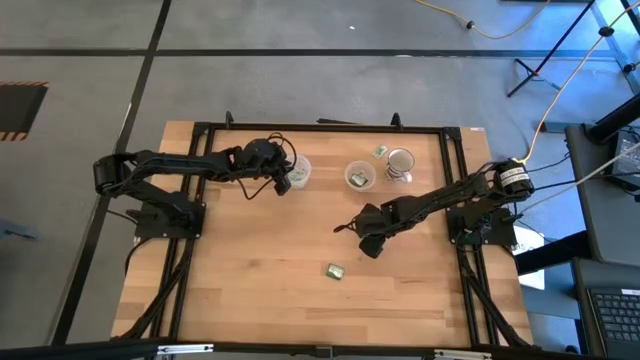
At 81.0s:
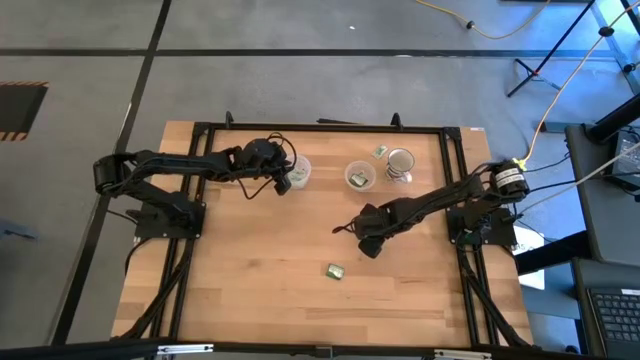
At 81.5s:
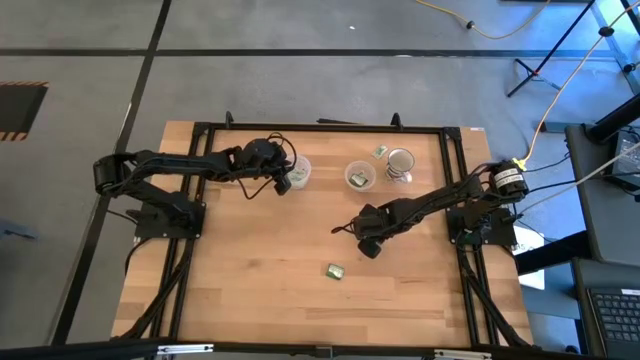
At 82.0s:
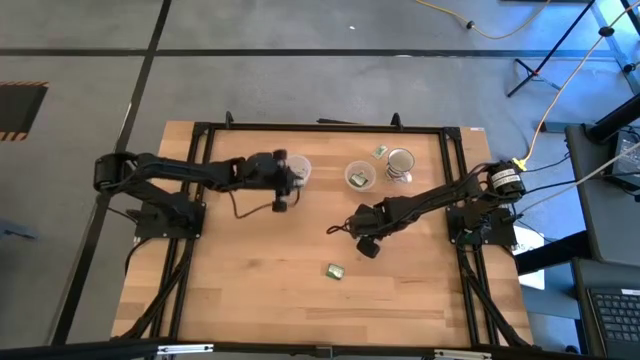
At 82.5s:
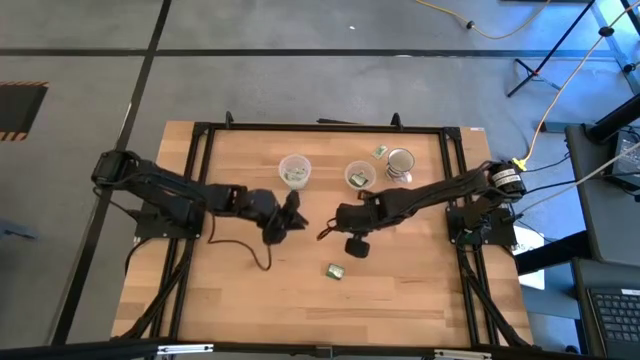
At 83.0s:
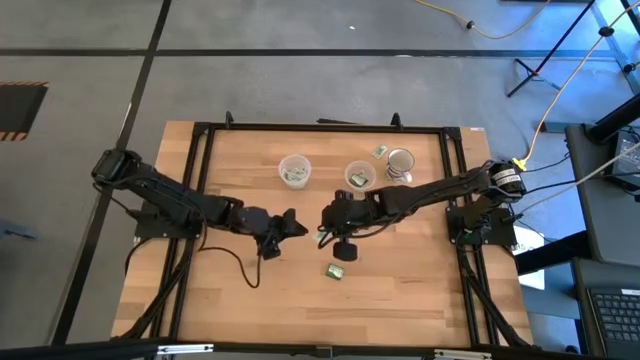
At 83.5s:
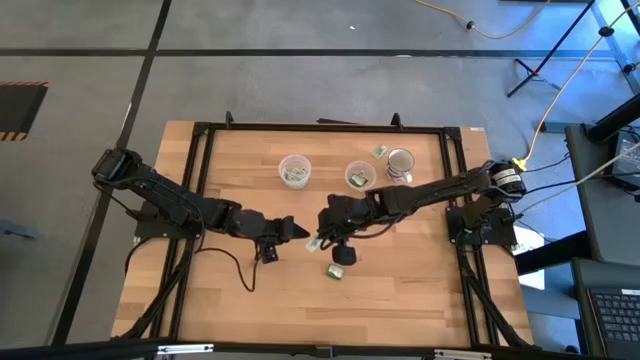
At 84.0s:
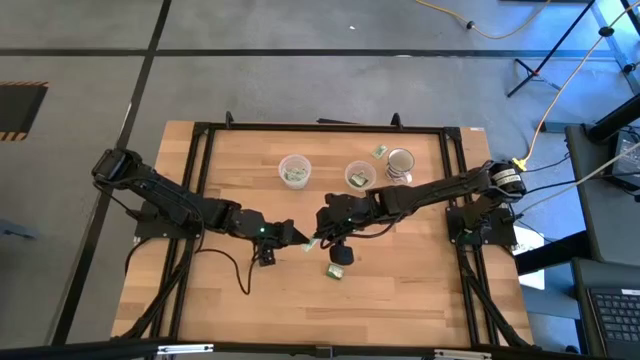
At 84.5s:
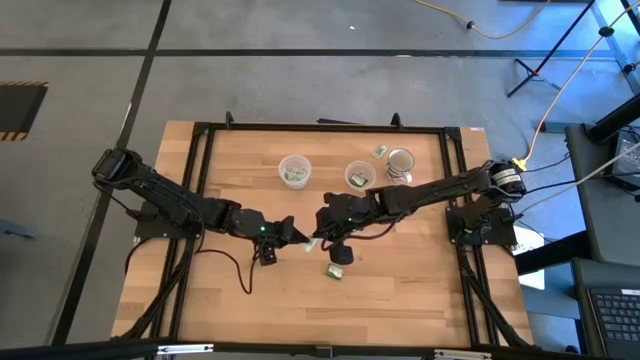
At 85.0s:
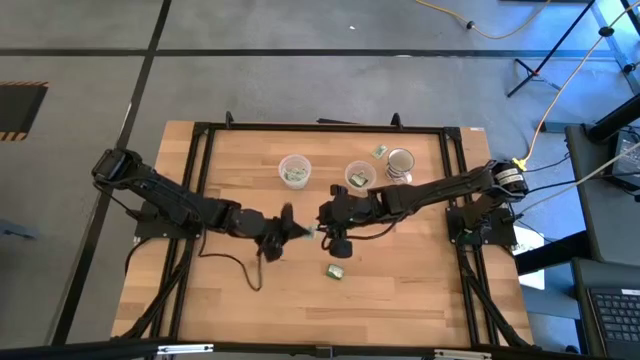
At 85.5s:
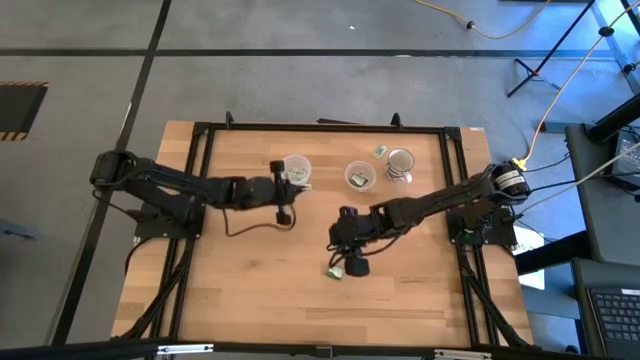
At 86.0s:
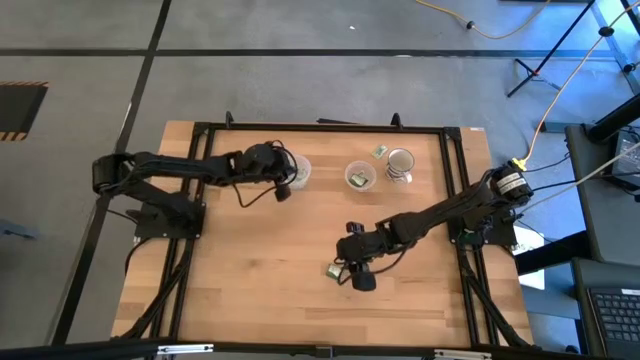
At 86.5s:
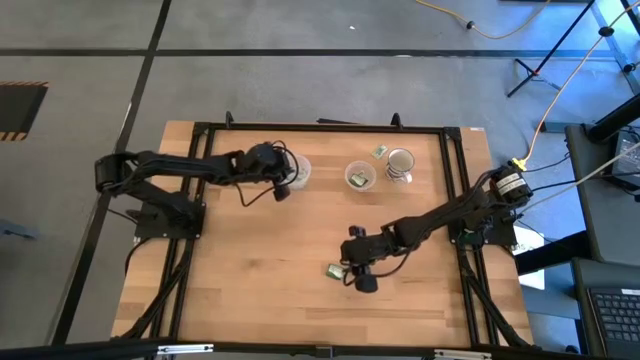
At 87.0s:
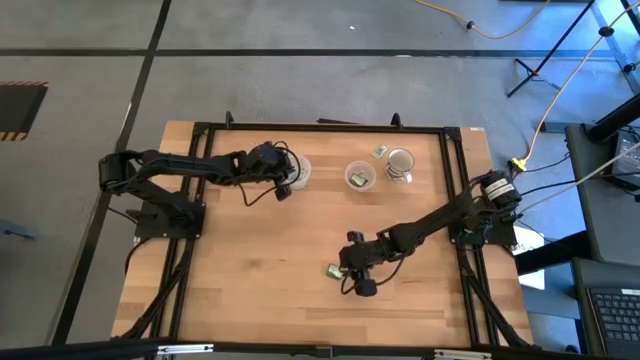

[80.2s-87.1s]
Task: Pick and place Stevia / Truvia into bins
Put the white stevia packet into the large transparent container

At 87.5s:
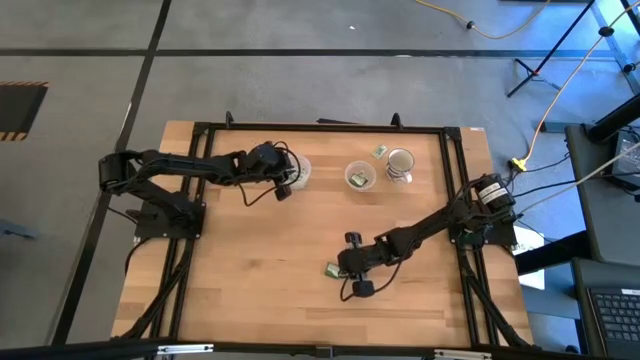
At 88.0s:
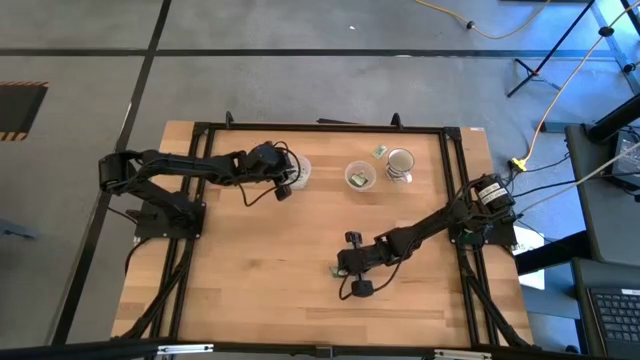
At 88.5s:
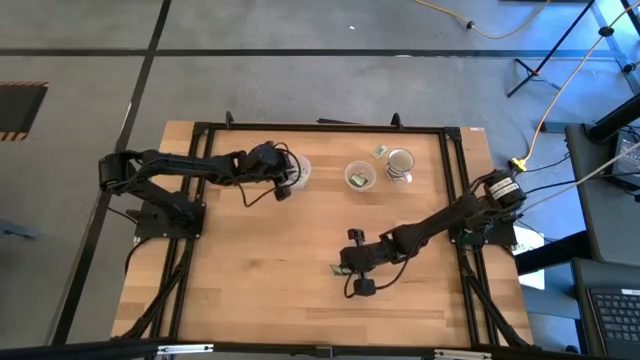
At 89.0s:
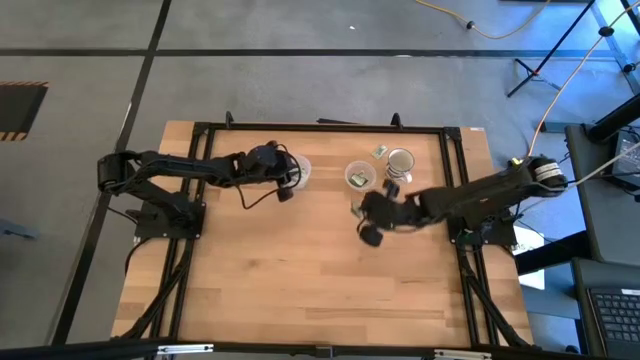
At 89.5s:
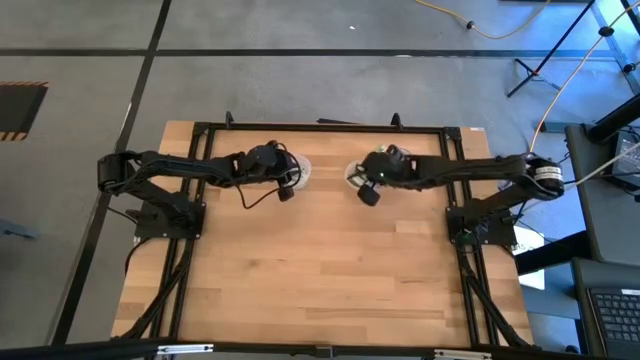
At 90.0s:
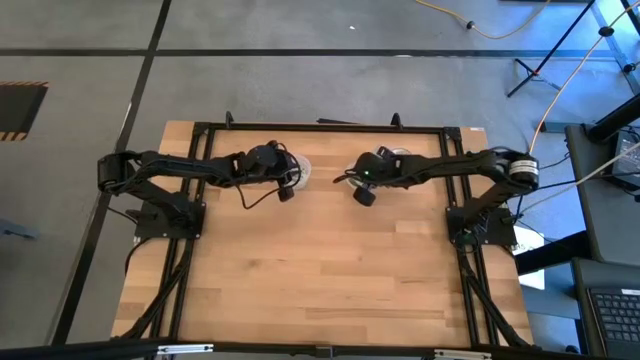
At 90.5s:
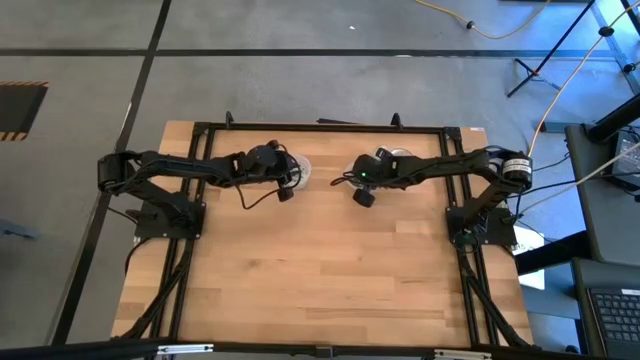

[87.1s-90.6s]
Put the green truvia packet into the small transparent container

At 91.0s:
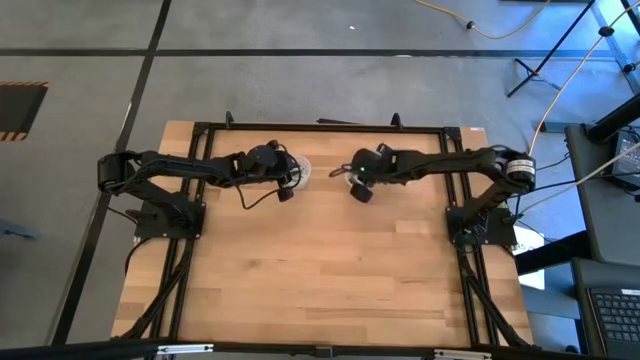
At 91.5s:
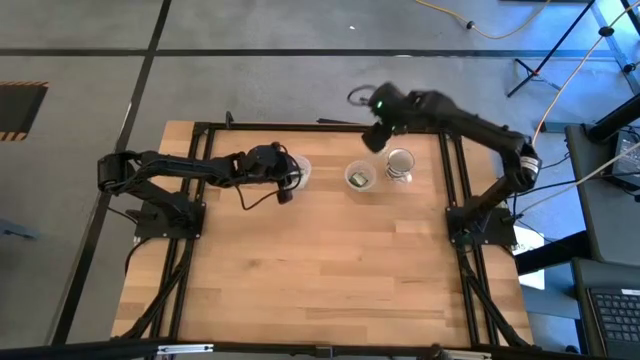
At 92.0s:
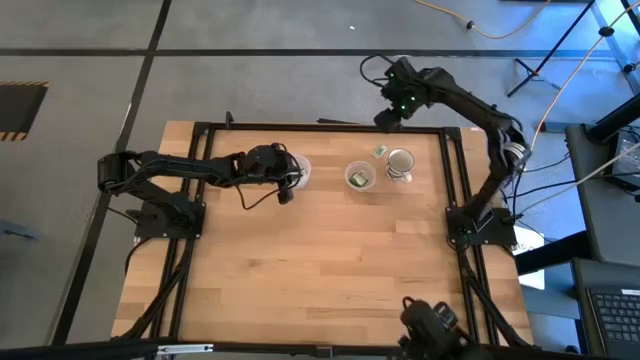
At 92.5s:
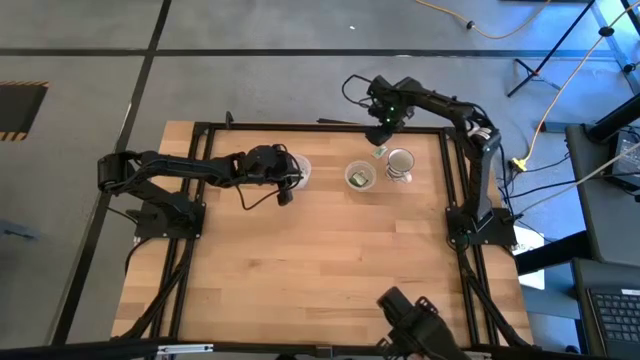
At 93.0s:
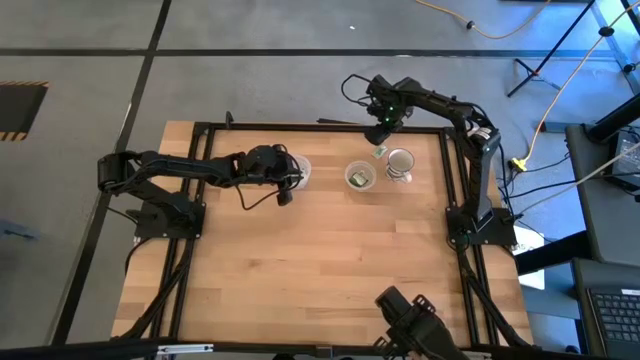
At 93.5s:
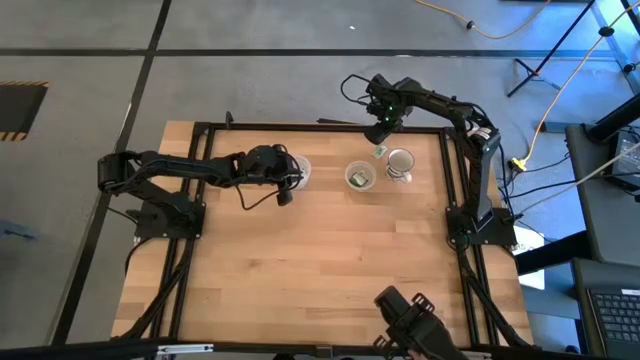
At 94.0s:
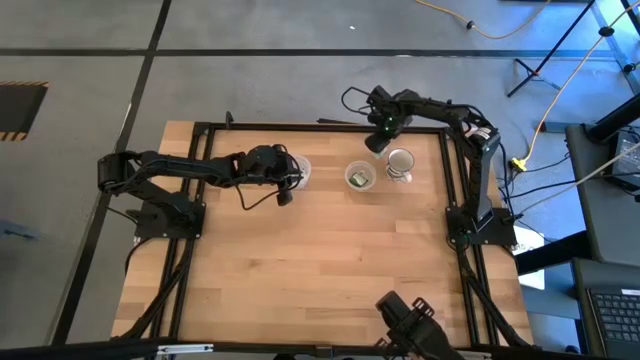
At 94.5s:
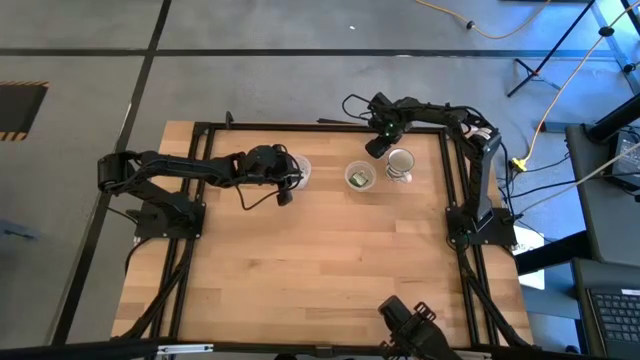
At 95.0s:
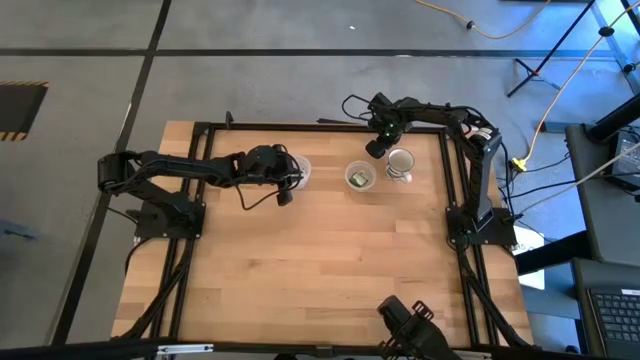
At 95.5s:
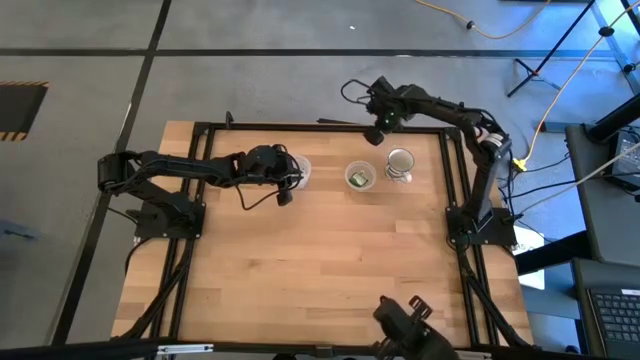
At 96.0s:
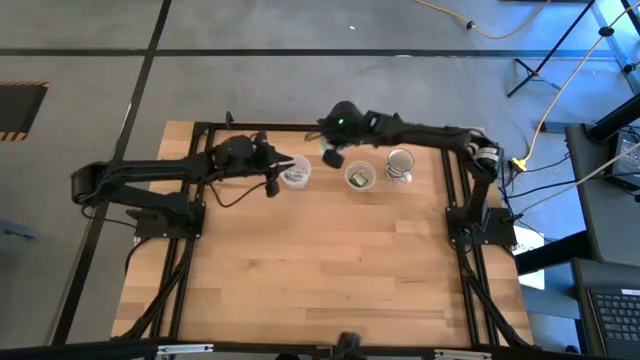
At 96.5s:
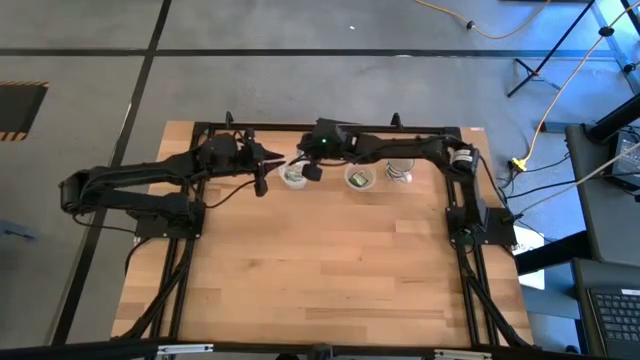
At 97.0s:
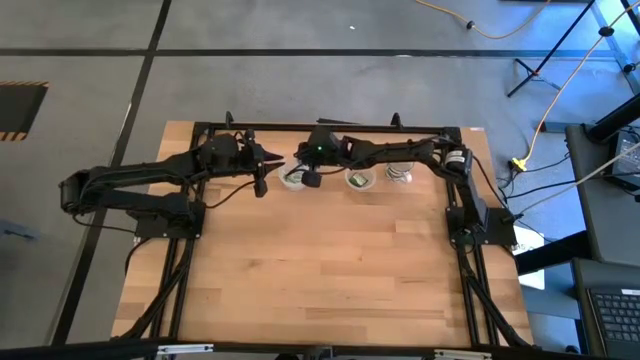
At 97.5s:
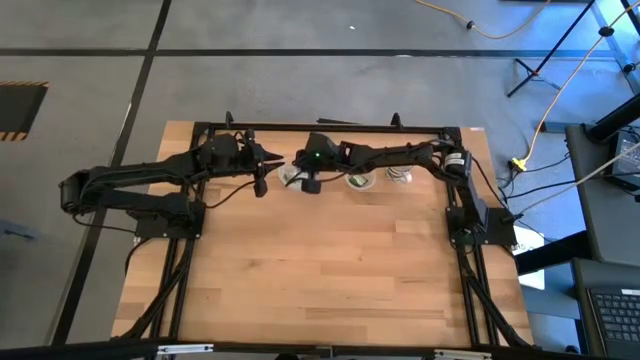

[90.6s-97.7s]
Put the white stevia packet into the large transparent container

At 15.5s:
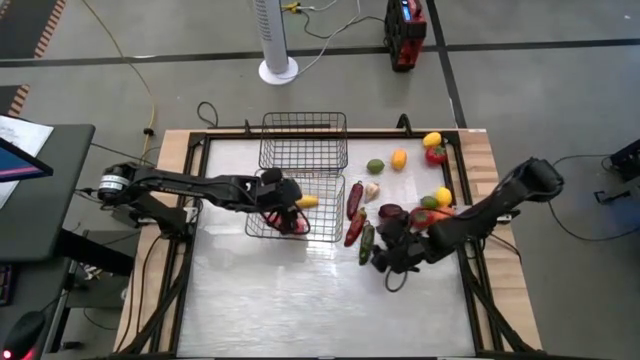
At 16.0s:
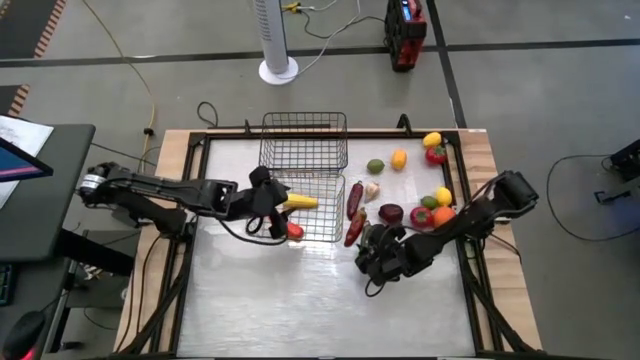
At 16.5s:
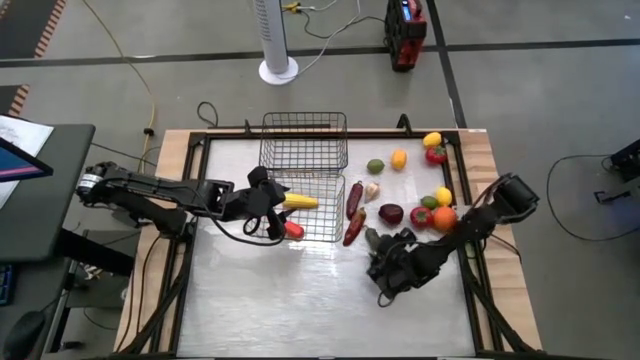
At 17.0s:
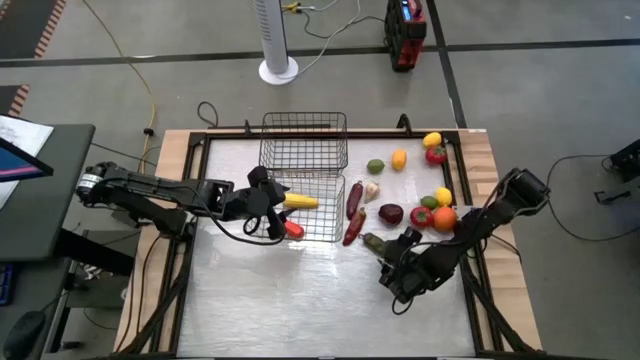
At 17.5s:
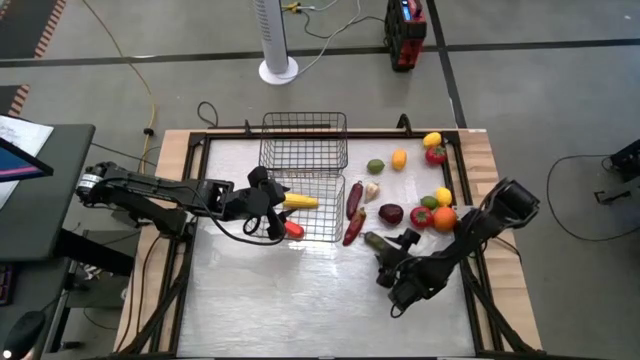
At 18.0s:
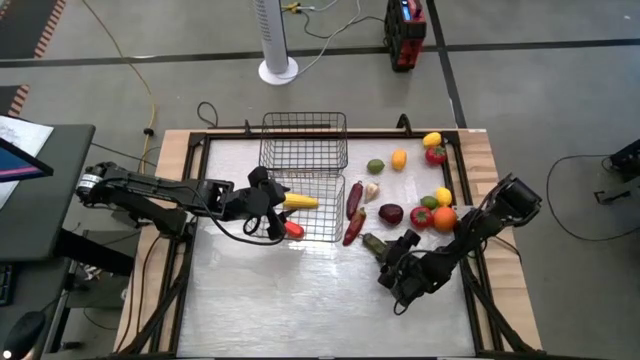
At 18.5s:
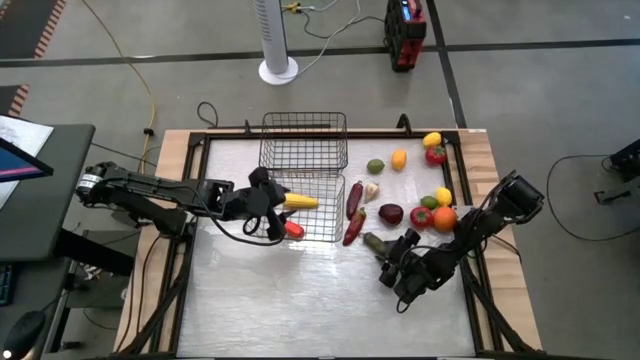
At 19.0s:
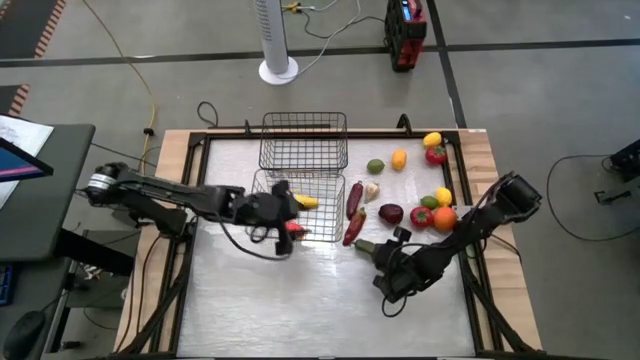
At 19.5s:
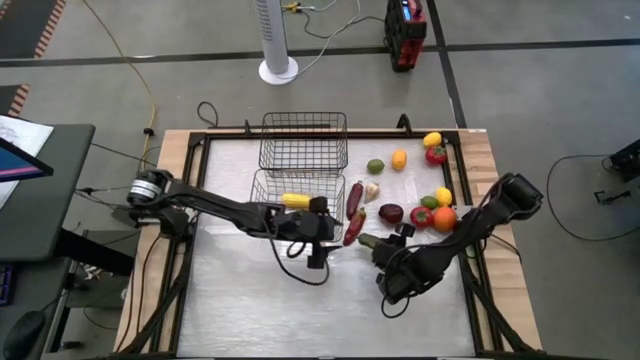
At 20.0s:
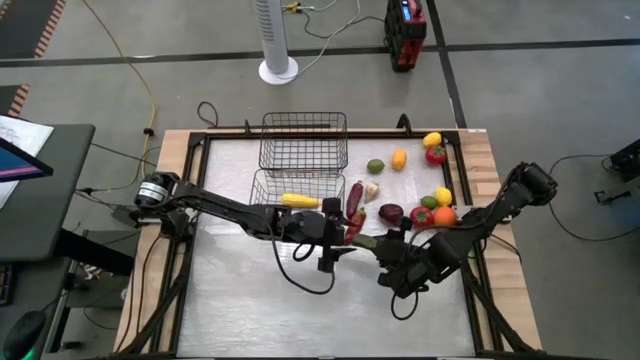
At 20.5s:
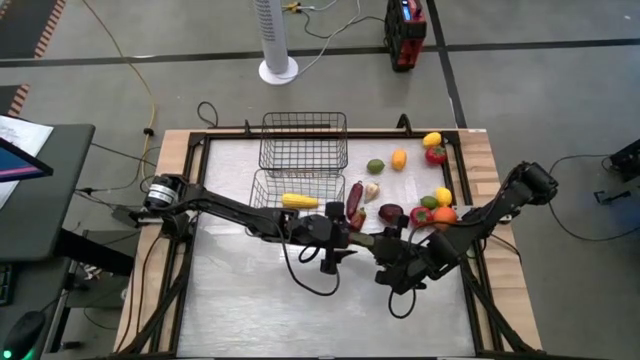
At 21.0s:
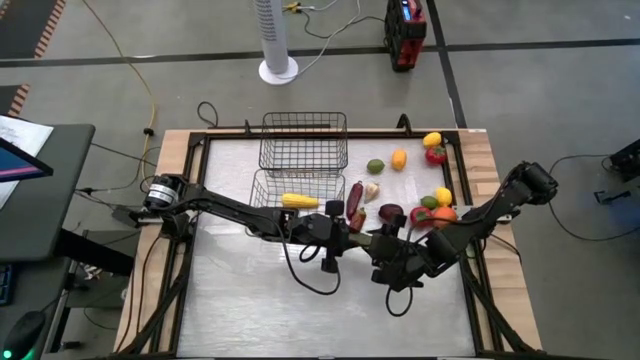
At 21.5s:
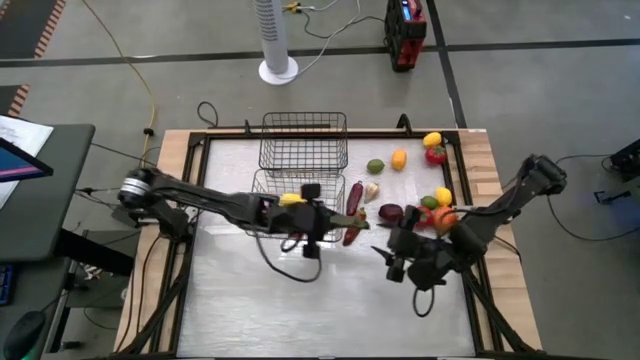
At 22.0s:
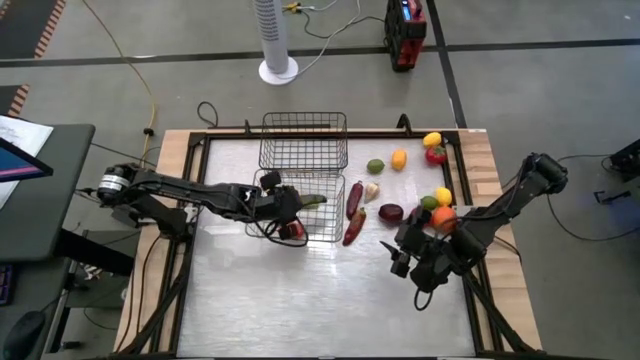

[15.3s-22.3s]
Task: Sort produce into baskets
Put the green chili pepper into the bottom wire basket
